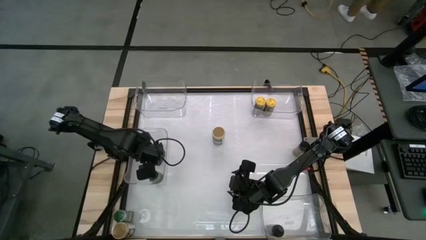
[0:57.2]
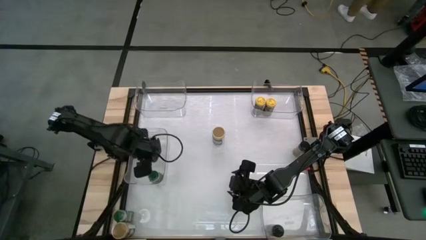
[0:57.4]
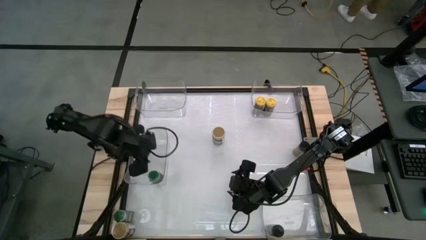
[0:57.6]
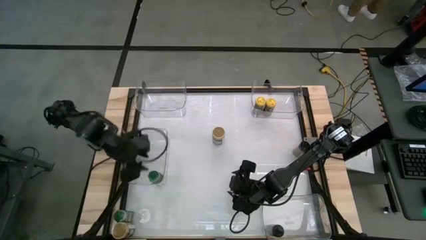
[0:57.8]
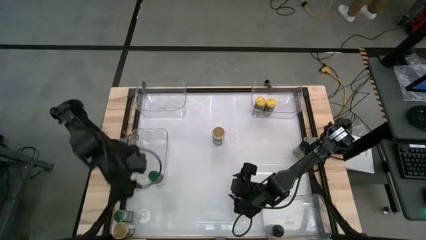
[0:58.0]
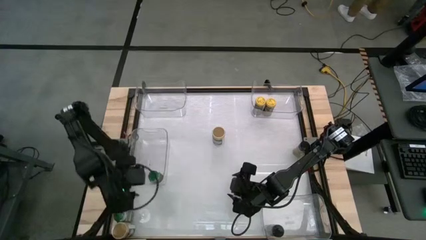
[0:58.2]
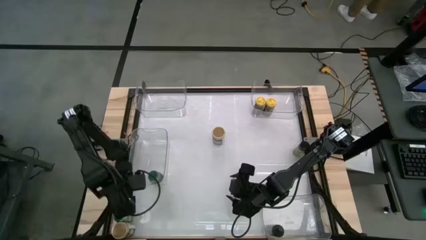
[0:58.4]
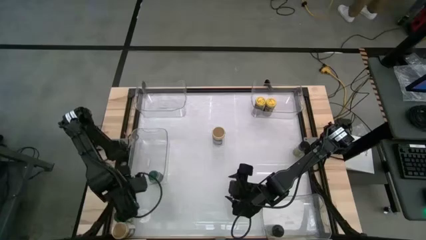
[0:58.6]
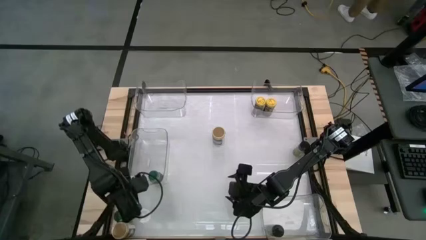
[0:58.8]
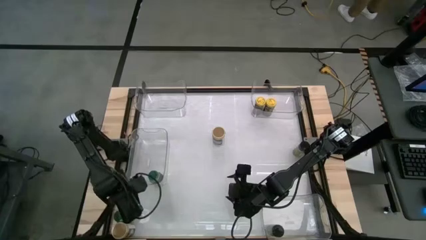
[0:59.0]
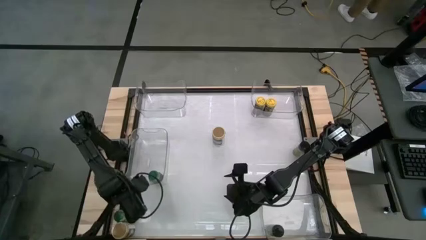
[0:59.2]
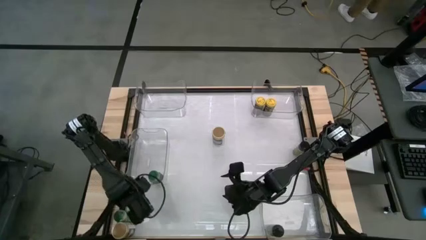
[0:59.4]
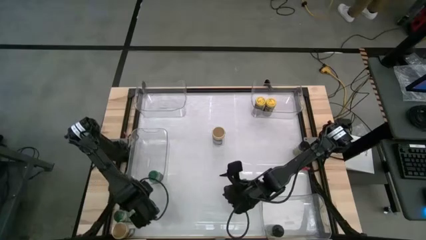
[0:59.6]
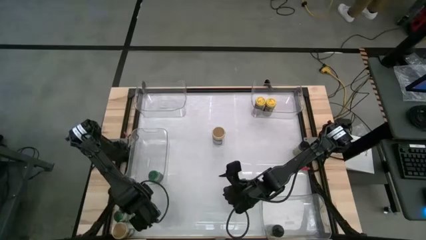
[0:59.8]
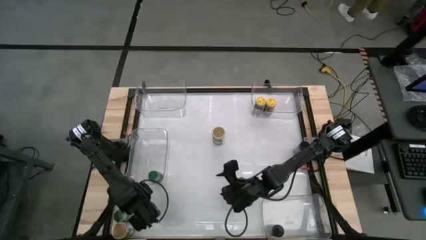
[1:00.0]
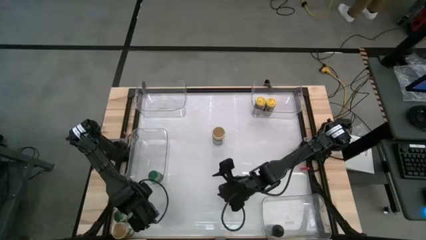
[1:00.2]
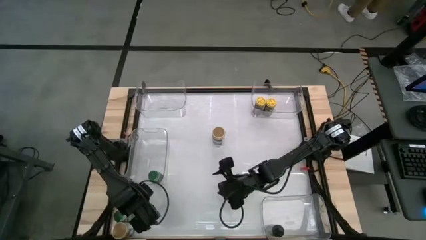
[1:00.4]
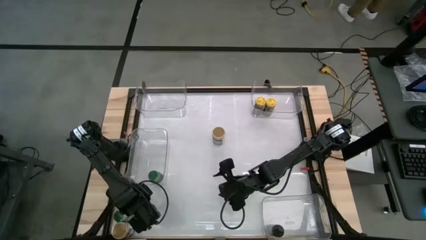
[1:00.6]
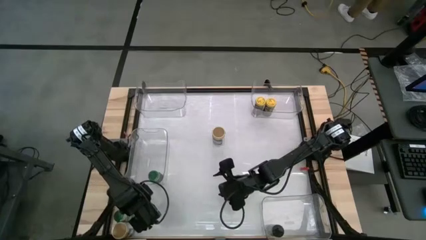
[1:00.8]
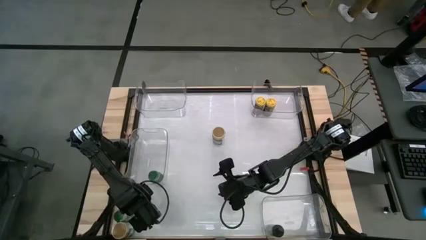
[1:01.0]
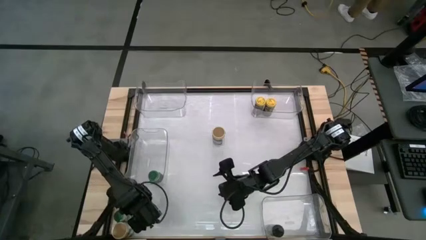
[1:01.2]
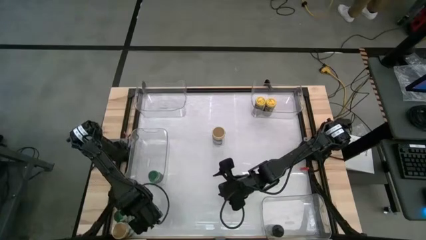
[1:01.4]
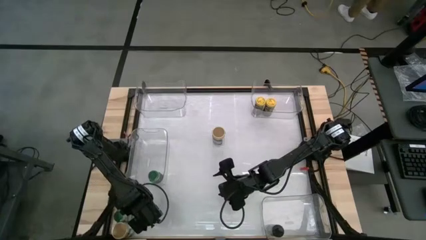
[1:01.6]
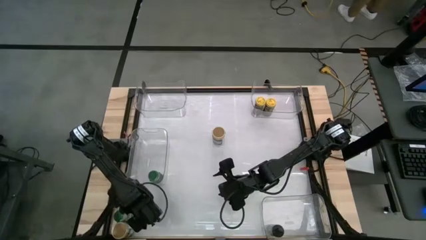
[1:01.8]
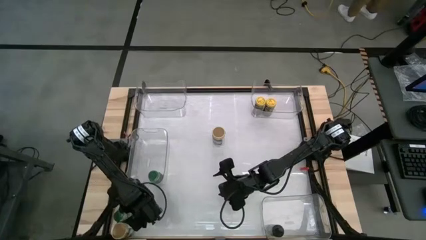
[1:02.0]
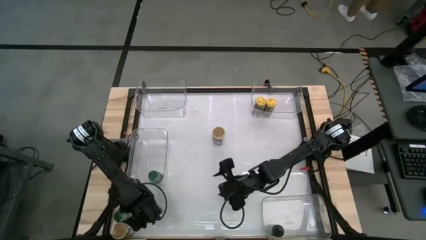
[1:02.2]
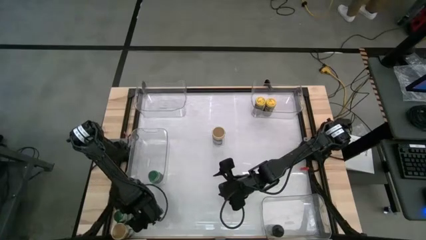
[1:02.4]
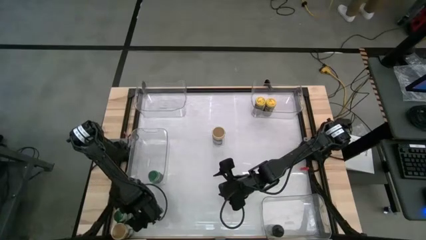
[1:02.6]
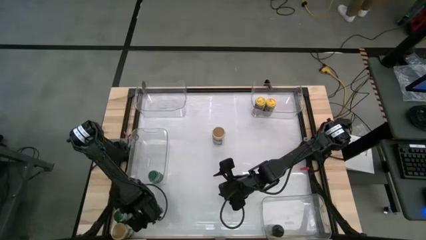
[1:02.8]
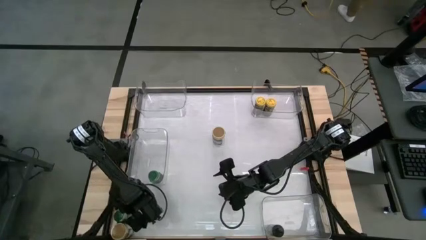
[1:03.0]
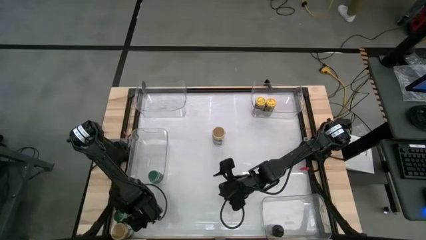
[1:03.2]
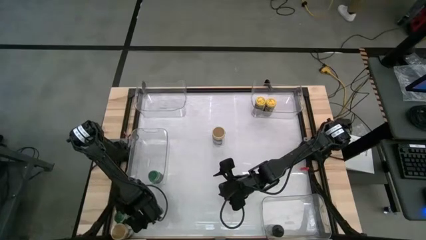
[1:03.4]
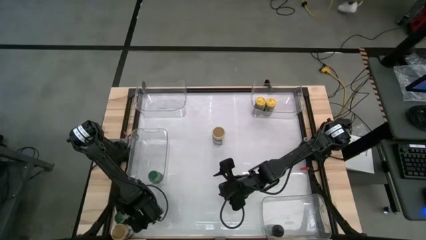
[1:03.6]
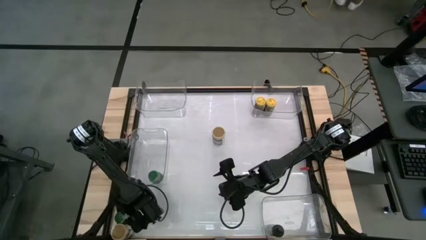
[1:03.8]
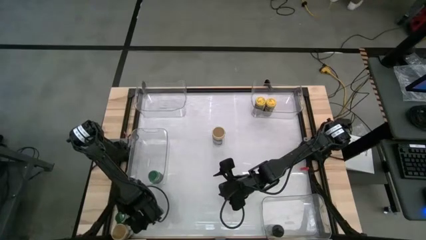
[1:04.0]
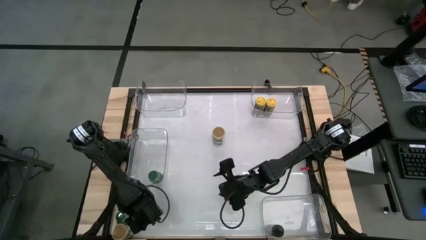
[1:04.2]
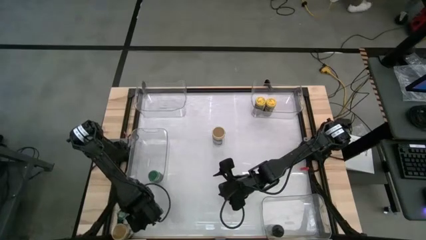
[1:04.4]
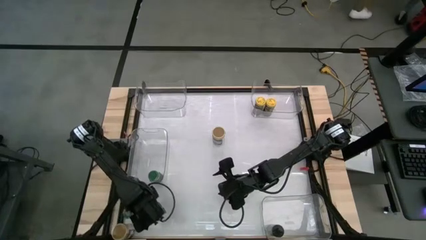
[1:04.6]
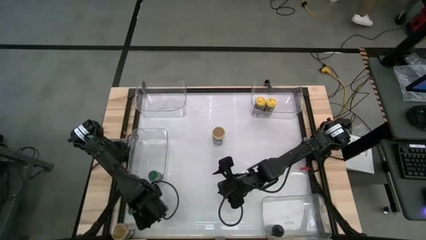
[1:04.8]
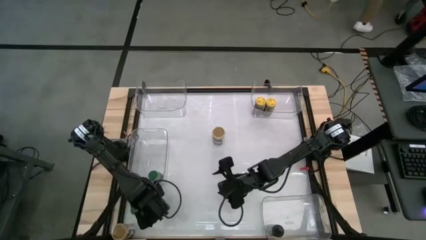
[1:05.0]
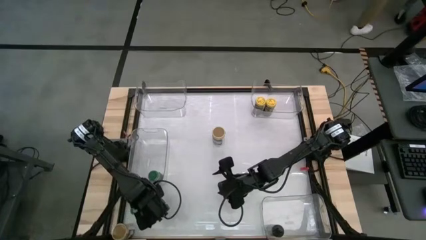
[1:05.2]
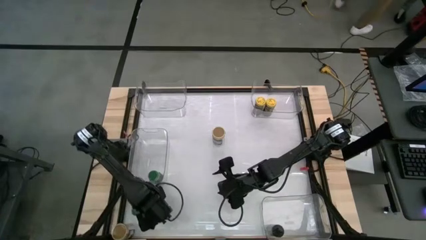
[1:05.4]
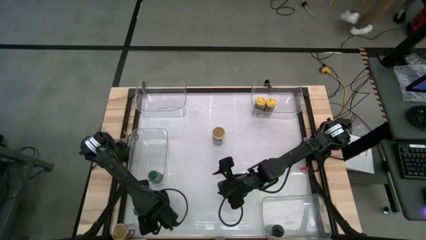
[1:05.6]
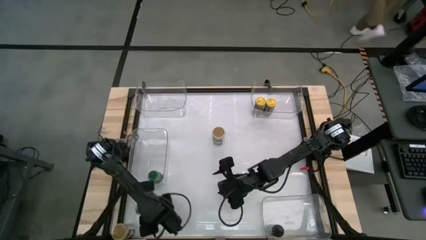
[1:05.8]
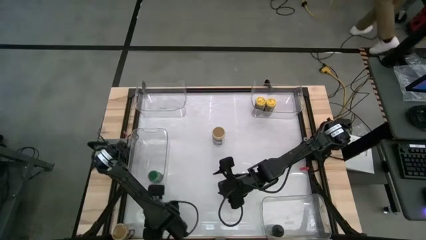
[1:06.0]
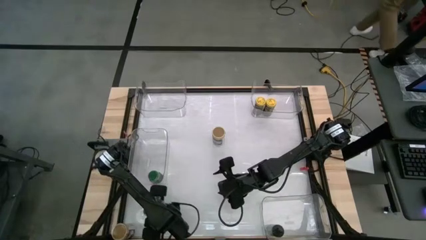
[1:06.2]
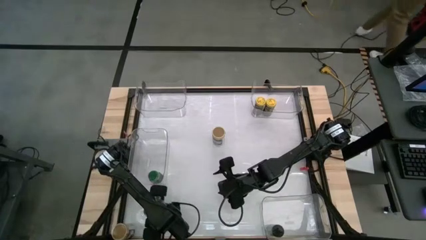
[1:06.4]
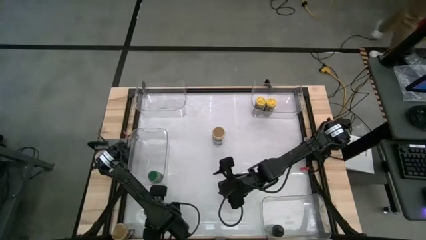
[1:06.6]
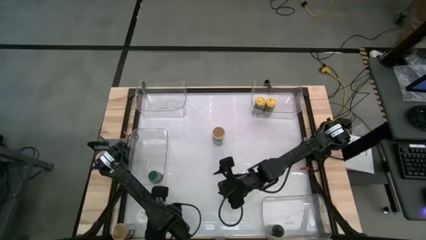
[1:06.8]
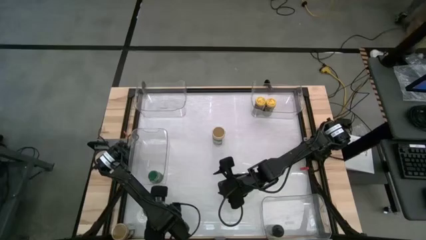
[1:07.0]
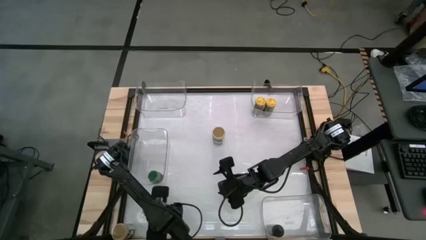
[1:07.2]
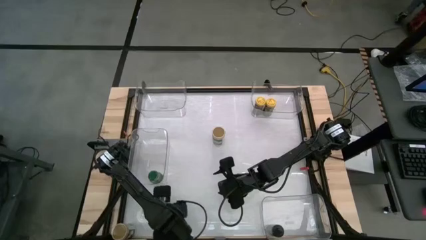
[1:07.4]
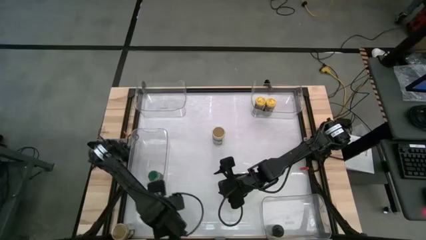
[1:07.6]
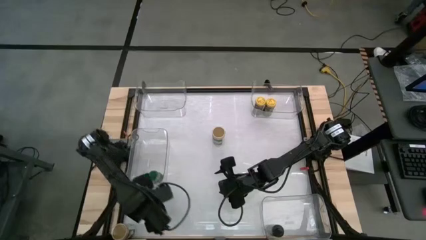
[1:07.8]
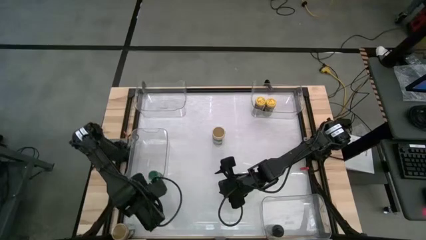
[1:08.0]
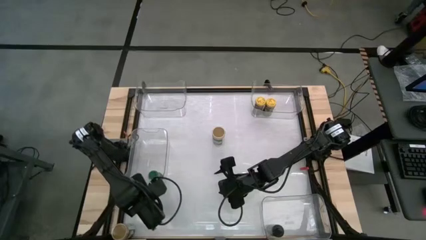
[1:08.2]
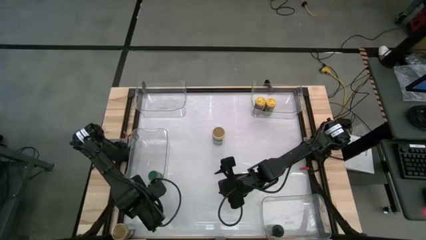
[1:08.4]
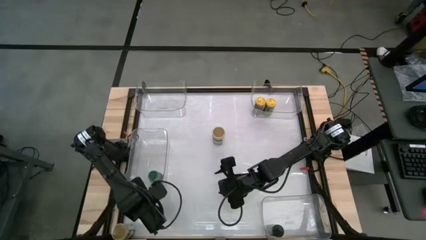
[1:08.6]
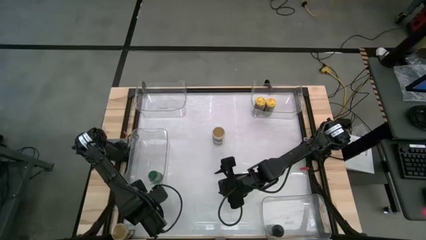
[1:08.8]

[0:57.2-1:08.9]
Task: Sort spices by type
Put the green seasoning bottle into the middle transparent bin

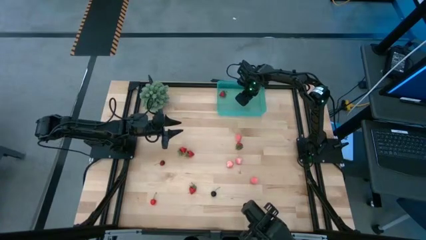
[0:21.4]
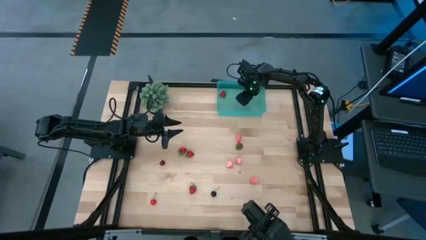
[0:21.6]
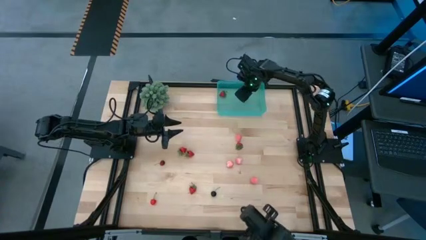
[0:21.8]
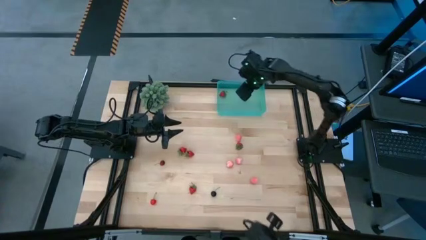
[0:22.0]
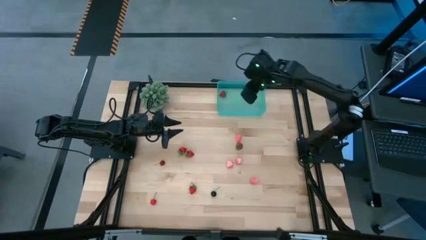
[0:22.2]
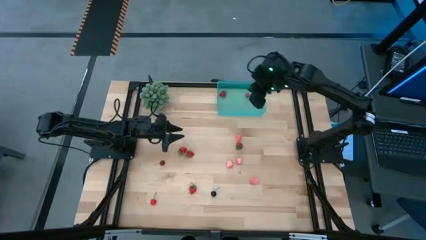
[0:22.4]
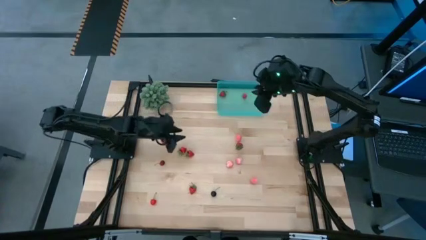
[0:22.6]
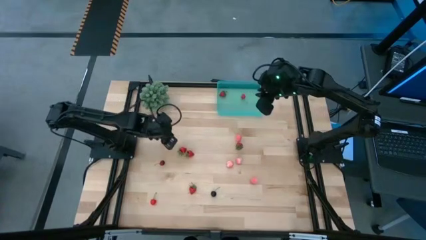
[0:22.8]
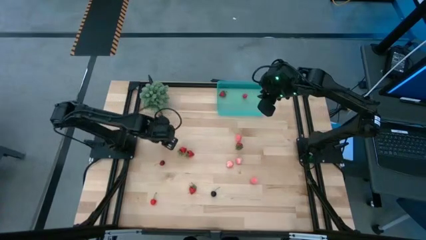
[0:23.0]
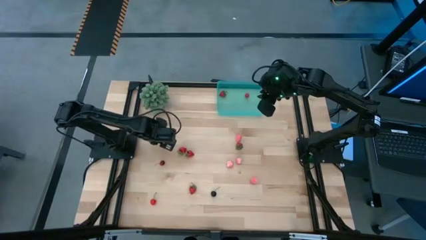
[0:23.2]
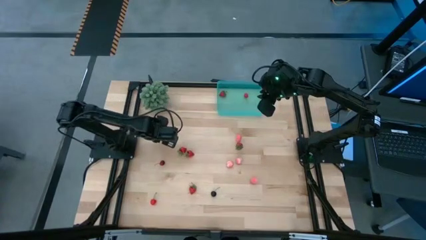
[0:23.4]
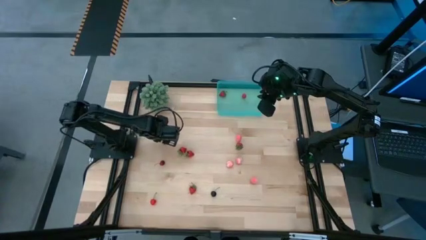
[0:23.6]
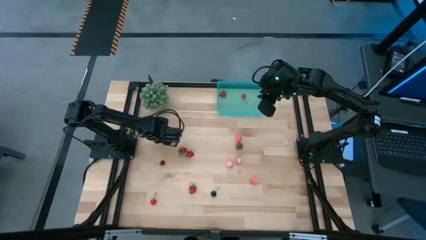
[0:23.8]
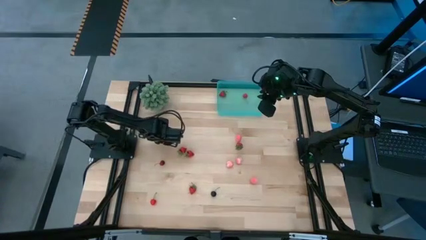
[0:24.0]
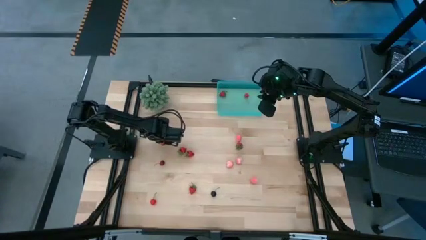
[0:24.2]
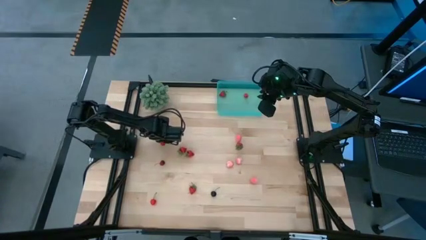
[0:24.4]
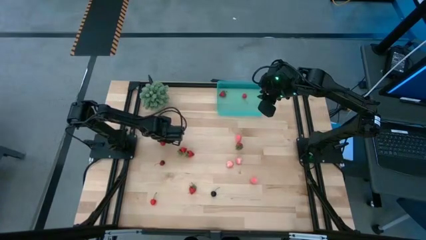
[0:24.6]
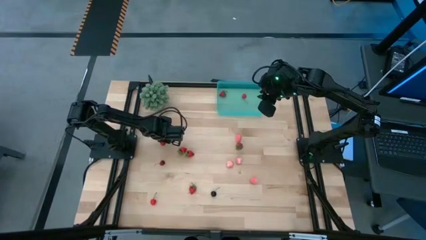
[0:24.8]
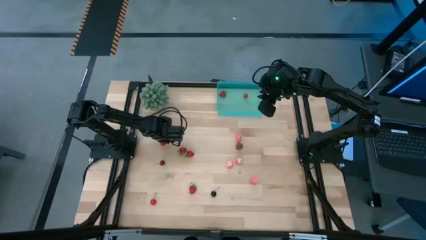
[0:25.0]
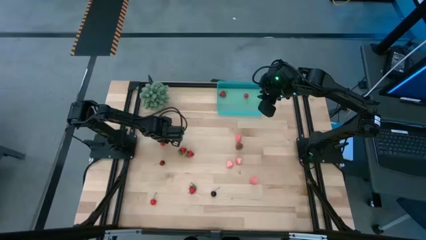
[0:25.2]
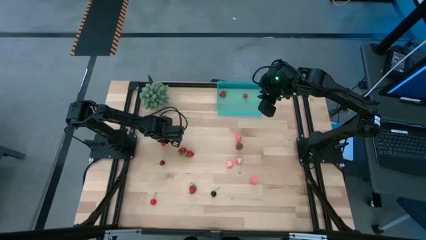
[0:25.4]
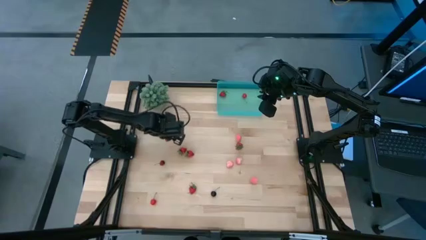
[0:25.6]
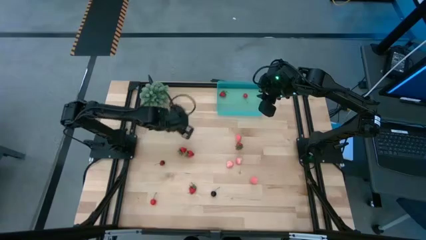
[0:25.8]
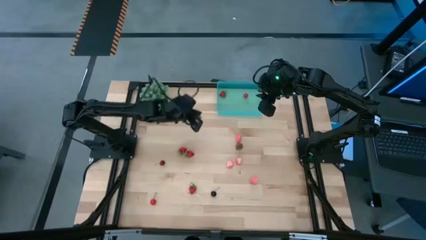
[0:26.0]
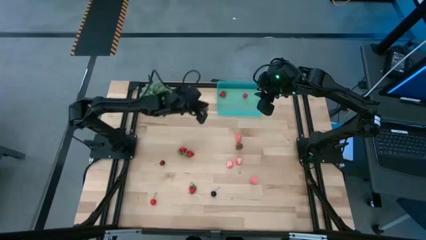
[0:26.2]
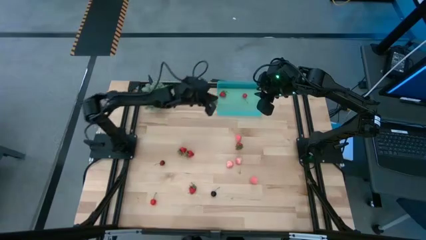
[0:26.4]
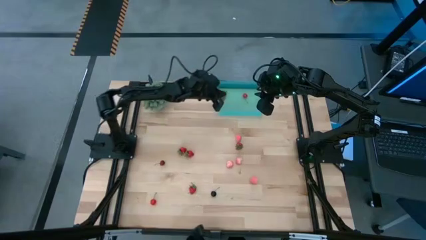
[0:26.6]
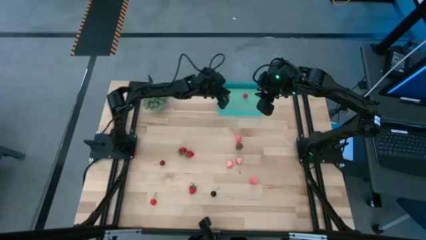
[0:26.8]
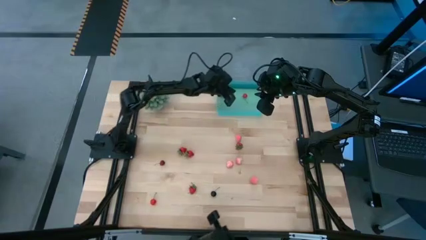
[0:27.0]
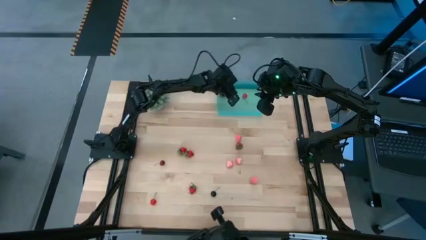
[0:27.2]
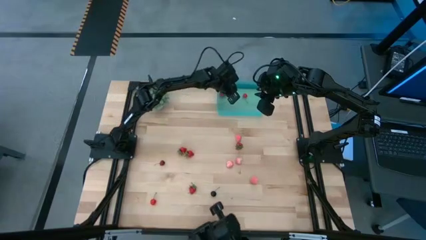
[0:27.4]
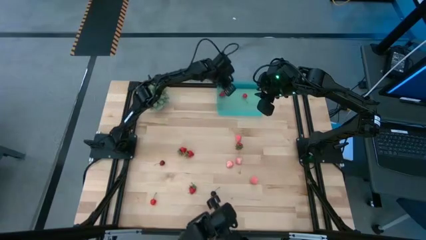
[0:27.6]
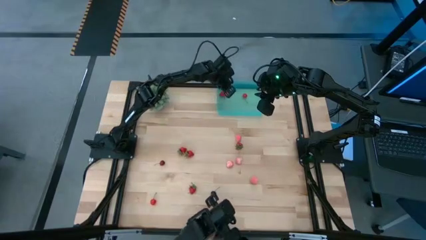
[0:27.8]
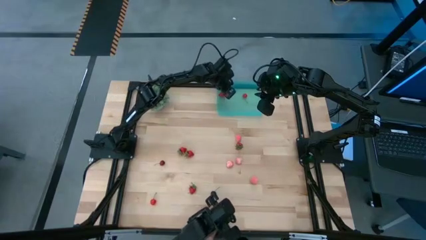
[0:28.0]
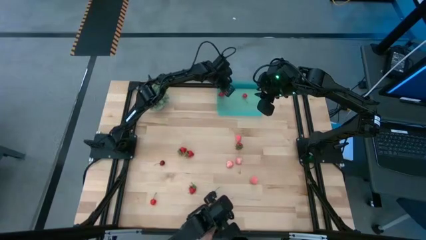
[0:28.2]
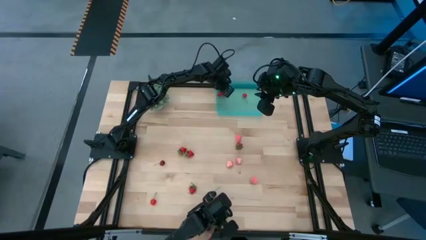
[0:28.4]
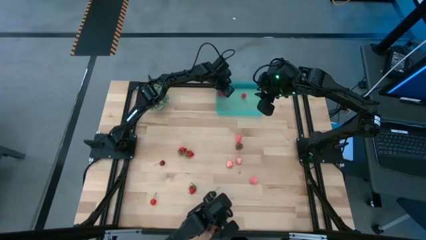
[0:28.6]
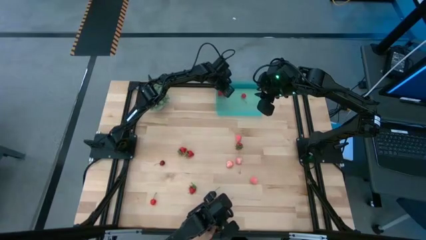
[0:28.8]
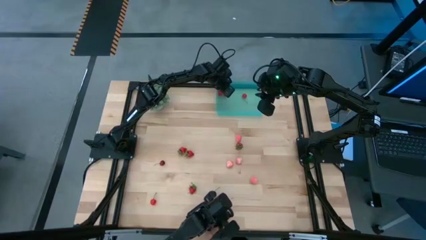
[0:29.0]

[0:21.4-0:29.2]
Task: Pick and placing Produce into tupperware
Put the strawberry into the blue bin
